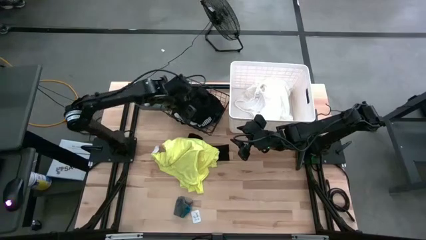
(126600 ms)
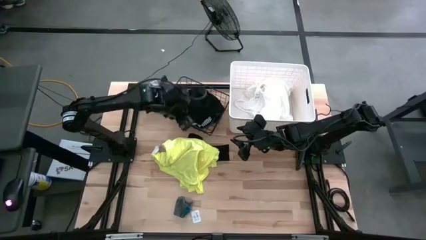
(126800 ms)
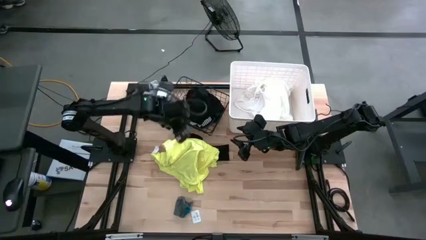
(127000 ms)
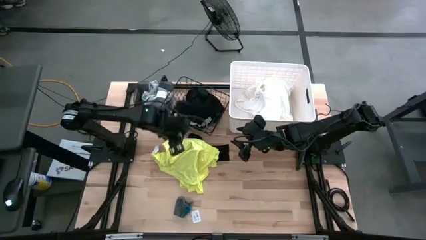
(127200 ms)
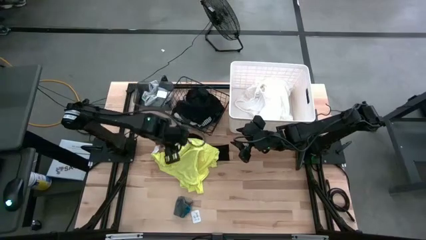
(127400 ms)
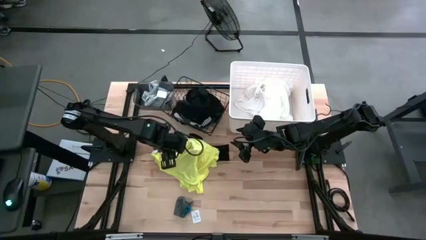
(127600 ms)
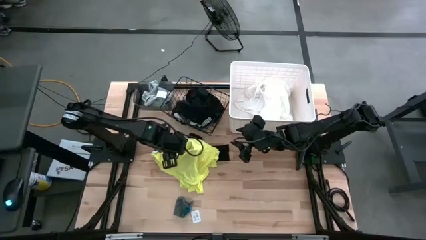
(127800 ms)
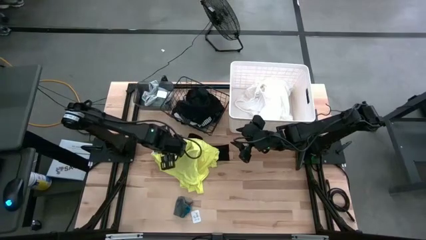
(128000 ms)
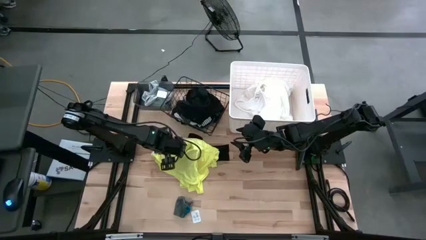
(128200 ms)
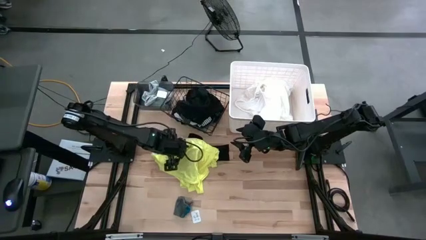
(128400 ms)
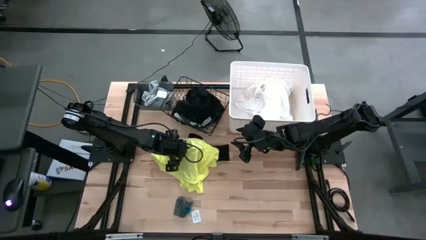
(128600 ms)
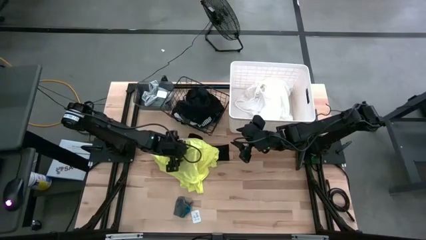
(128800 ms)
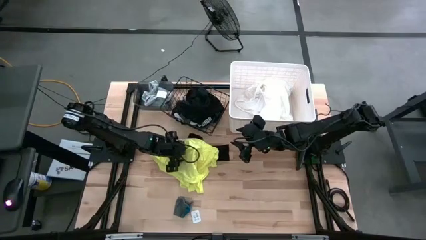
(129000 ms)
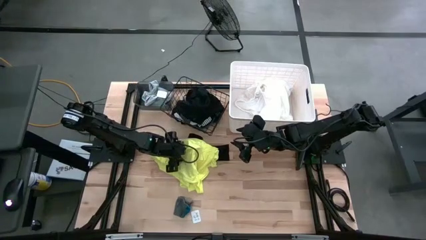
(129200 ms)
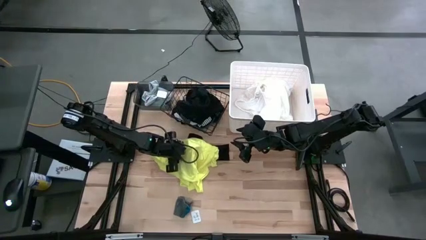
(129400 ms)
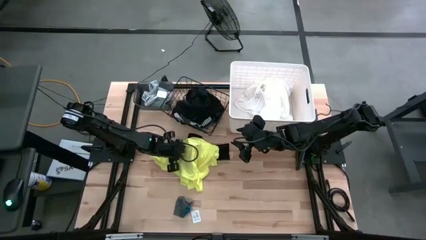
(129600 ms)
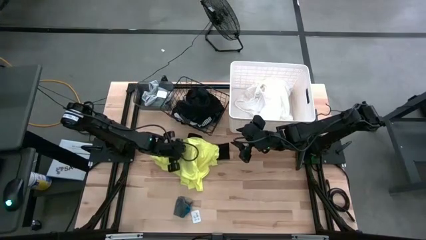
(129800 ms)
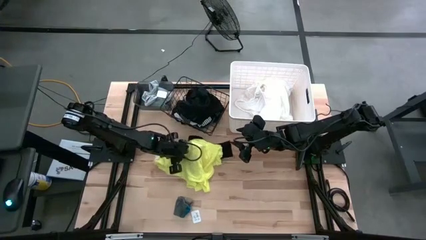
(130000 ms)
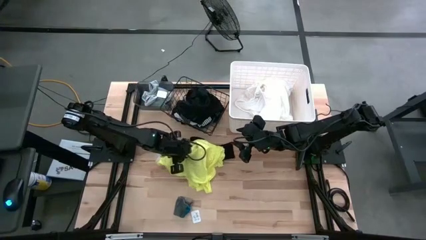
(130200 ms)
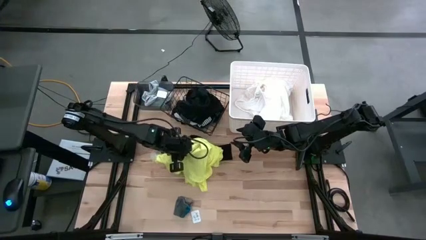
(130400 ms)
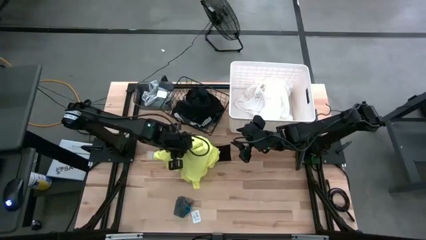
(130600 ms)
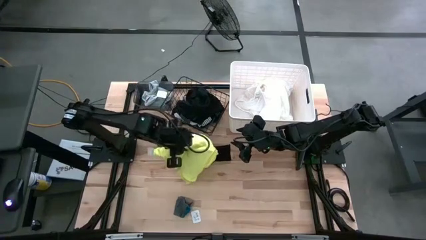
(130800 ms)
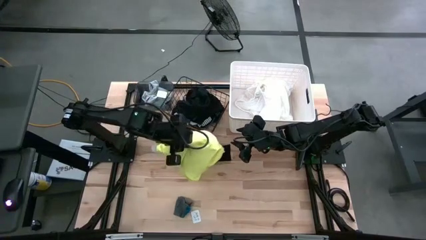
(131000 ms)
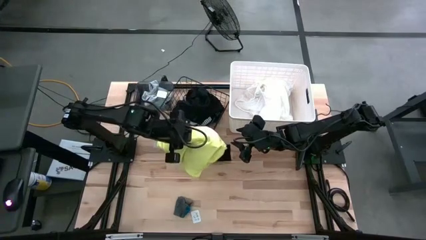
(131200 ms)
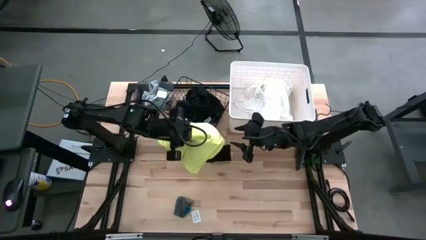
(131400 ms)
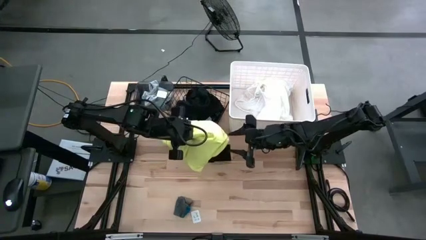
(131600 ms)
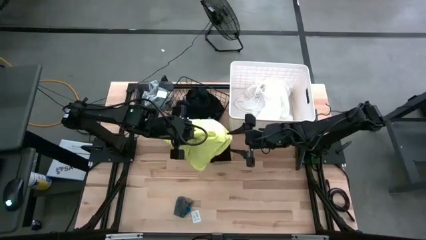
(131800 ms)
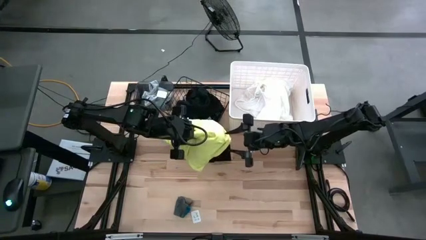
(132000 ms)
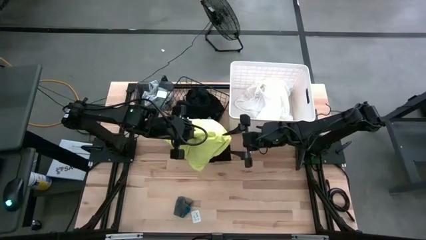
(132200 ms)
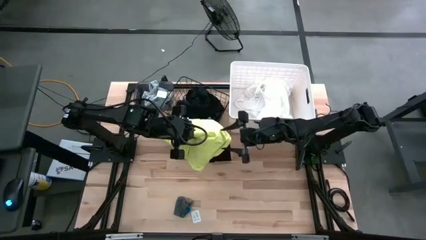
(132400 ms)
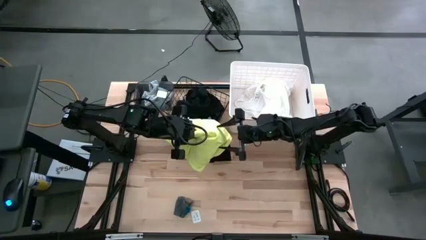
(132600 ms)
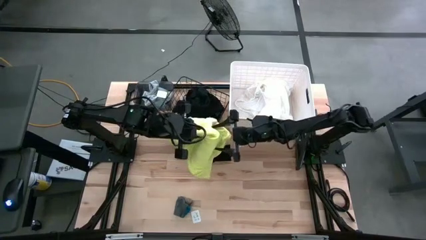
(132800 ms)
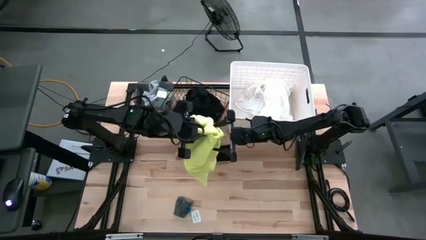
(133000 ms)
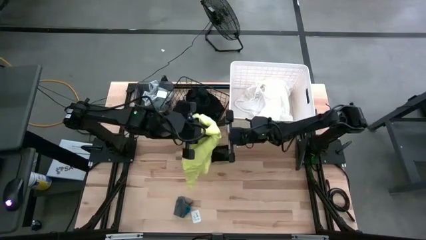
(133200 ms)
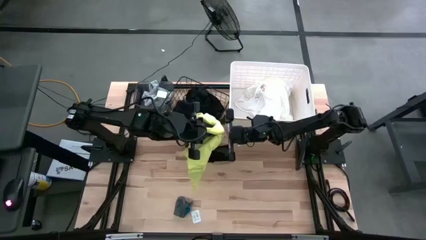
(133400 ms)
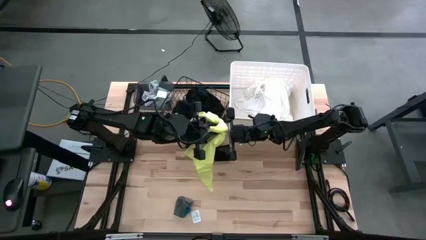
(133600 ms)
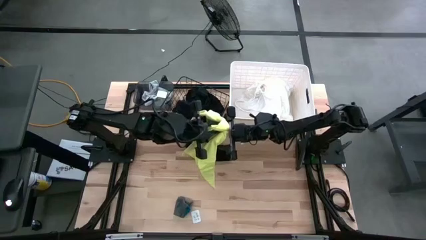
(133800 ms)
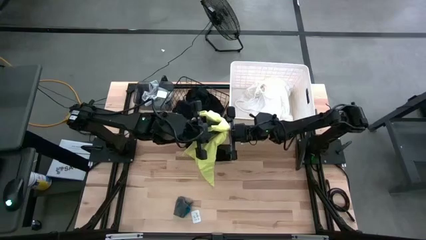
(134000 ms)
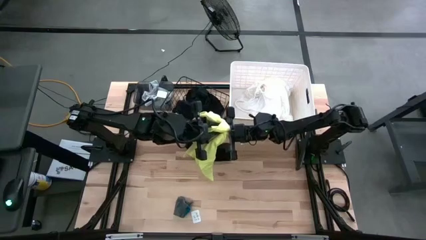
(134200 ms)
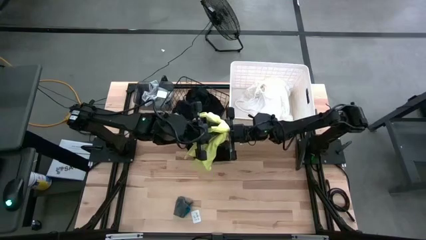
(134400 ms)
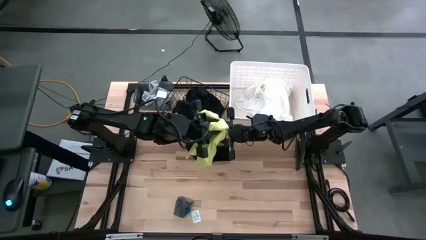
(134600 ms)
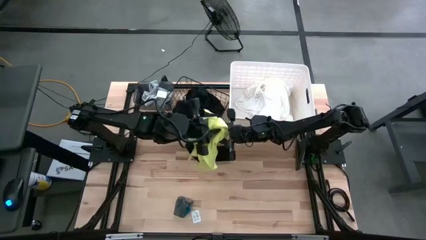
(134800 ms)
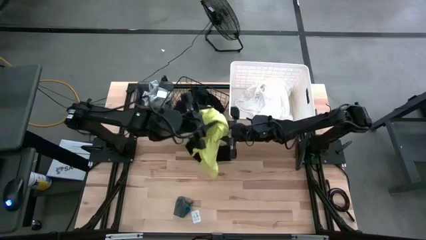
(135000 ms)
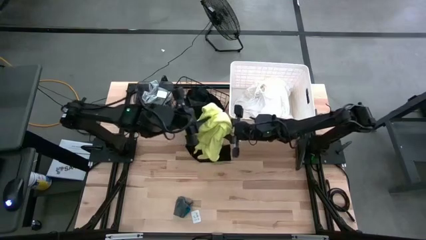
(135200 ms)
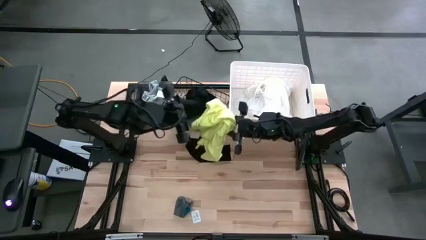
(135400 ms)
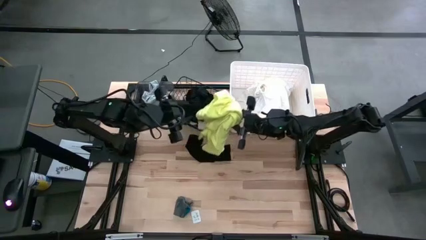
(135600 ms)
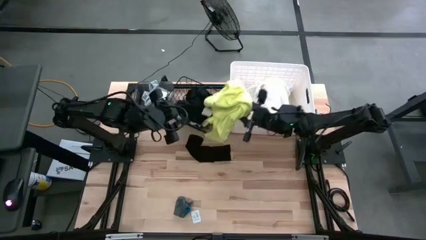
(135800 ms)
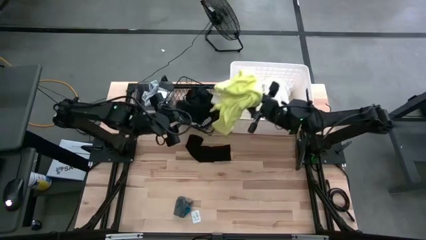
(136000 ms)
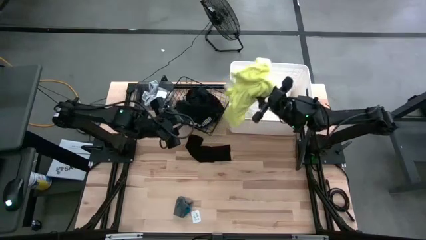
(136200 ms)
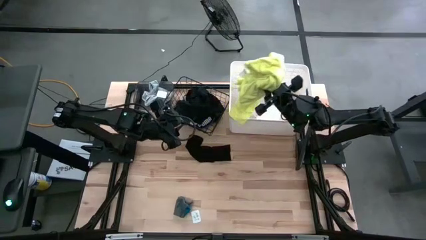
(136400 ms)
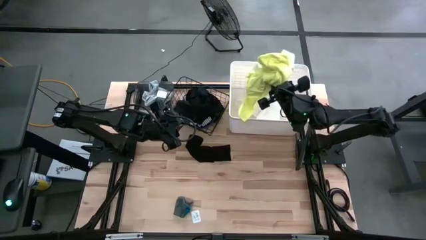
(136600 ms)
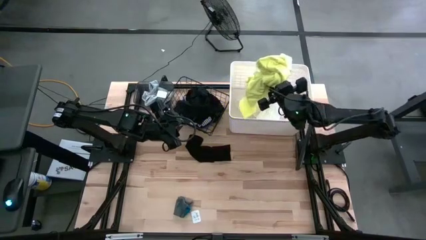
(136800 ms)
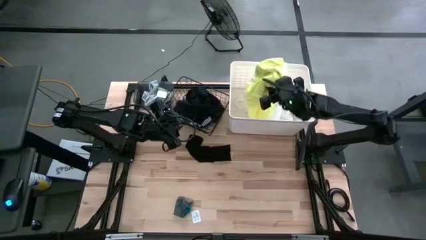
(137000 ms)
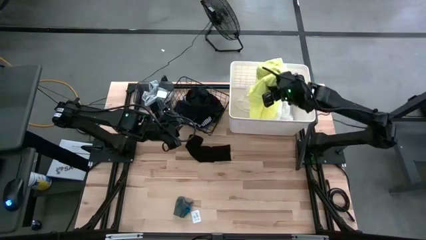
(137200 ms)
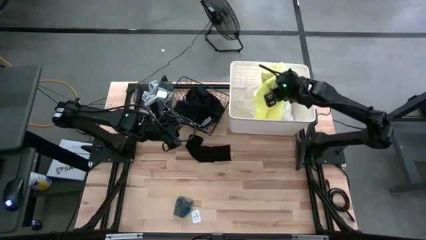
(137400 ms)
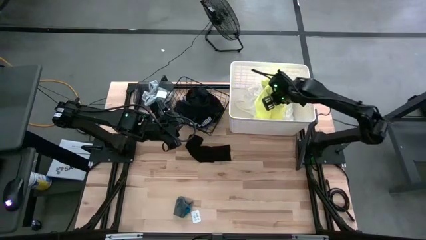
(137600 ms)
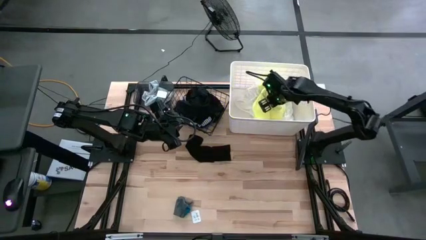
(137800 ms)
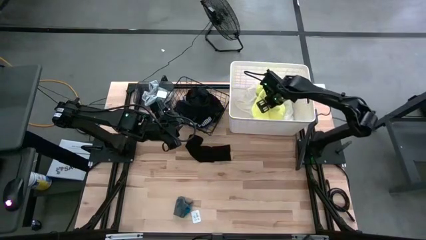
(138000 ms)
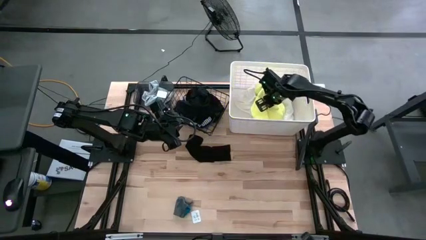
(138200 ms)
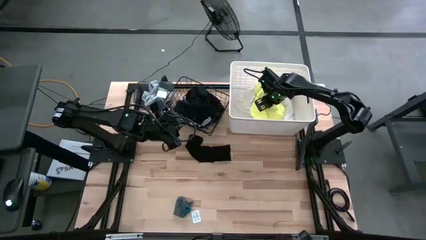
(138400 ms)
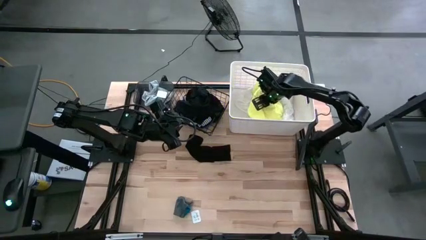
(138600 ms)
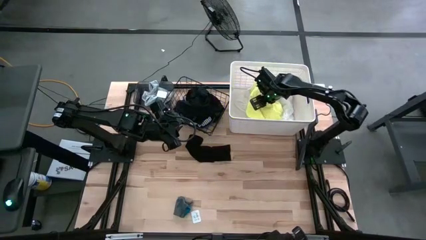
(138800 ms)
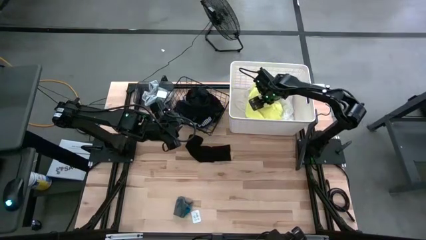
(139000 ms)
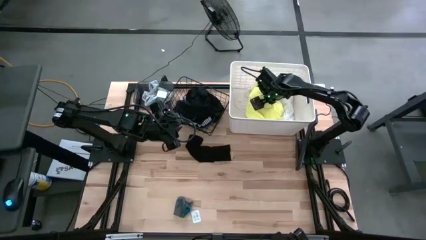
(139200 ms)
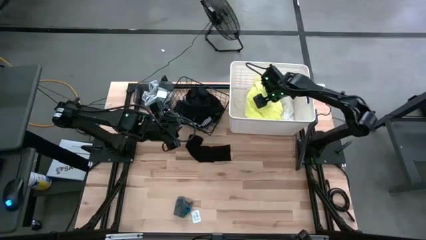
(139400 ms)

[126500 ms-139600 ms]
Task: Pick & Place Cloths
Put the yellow dress into the white laundry bin

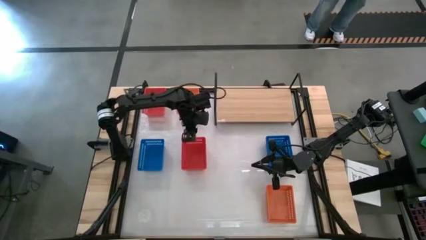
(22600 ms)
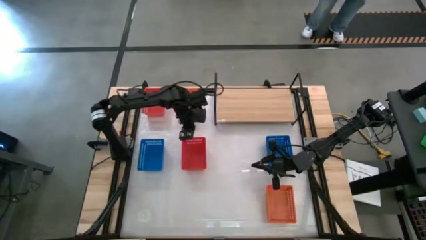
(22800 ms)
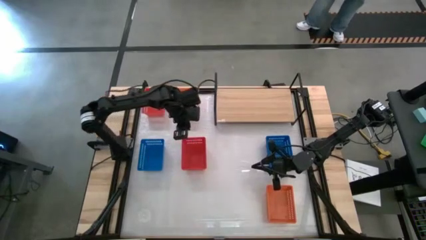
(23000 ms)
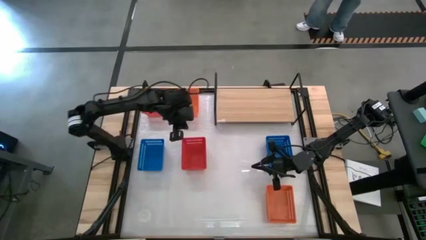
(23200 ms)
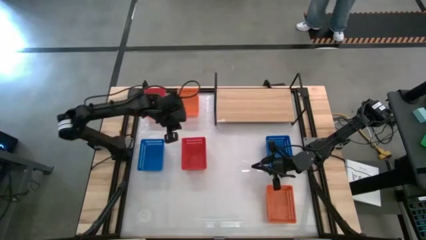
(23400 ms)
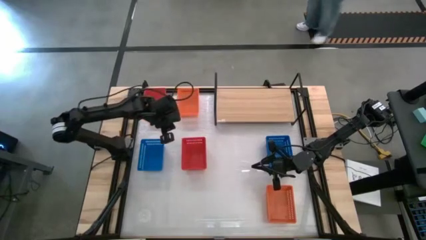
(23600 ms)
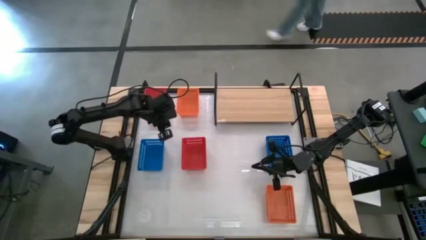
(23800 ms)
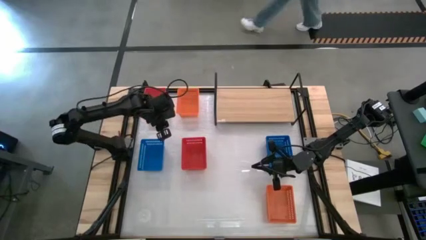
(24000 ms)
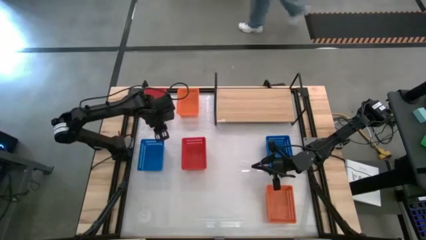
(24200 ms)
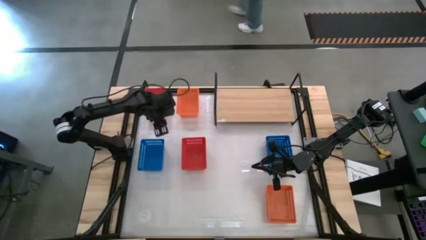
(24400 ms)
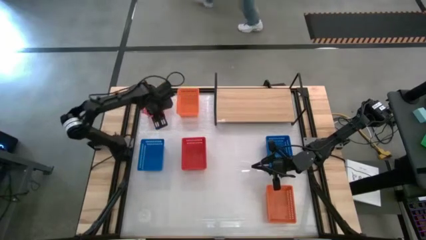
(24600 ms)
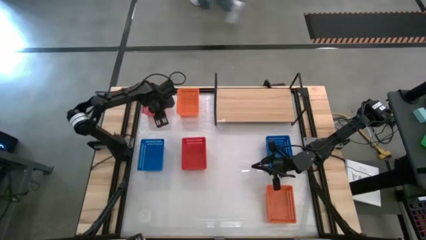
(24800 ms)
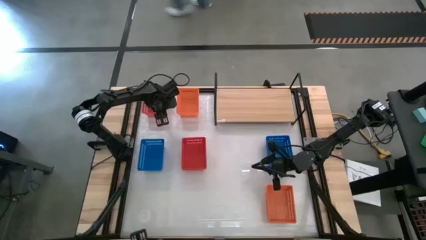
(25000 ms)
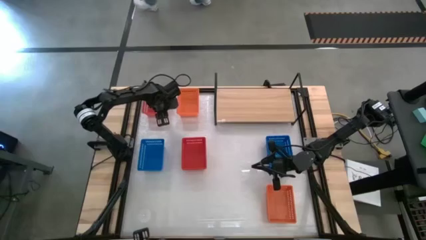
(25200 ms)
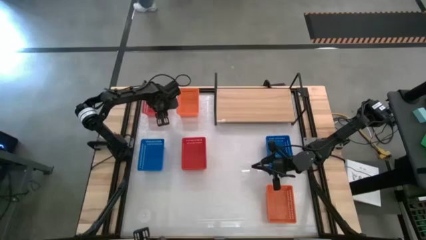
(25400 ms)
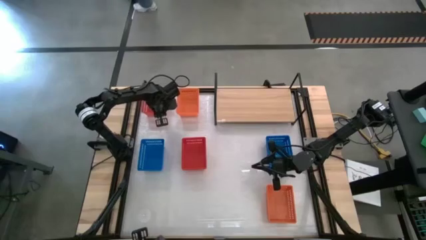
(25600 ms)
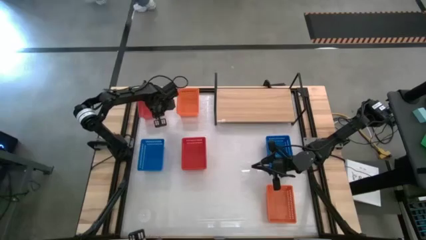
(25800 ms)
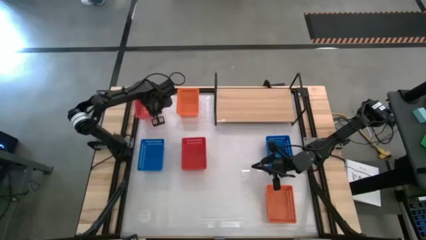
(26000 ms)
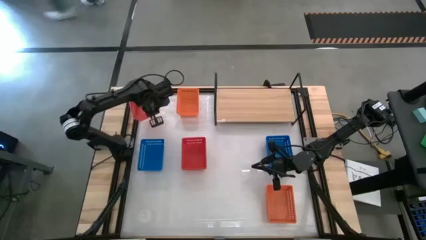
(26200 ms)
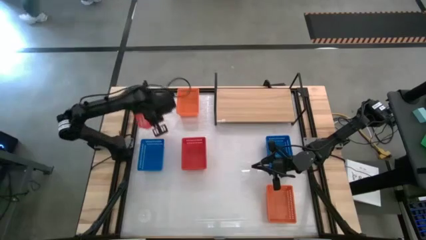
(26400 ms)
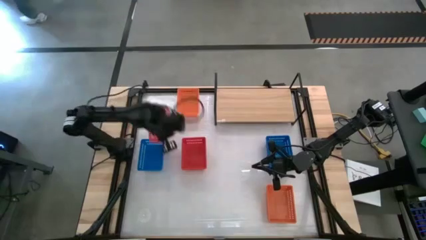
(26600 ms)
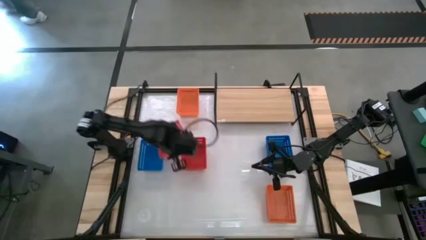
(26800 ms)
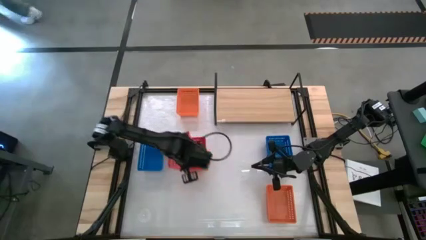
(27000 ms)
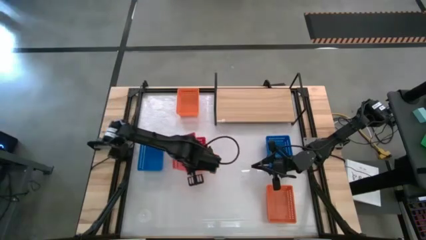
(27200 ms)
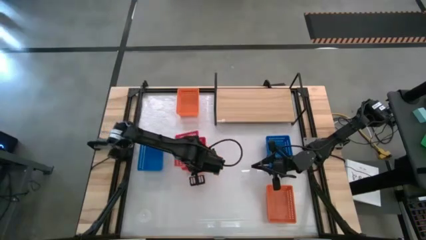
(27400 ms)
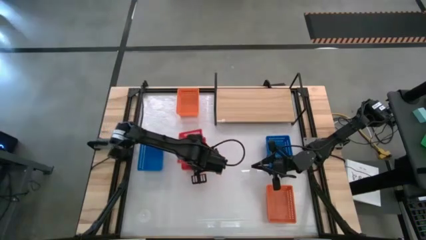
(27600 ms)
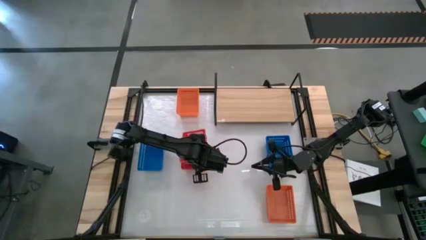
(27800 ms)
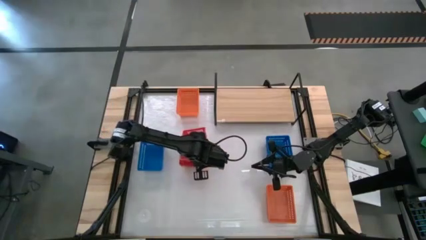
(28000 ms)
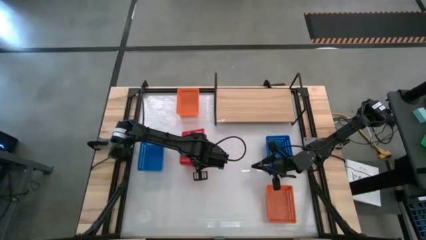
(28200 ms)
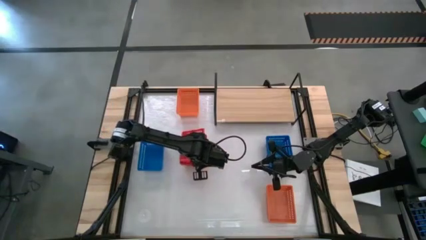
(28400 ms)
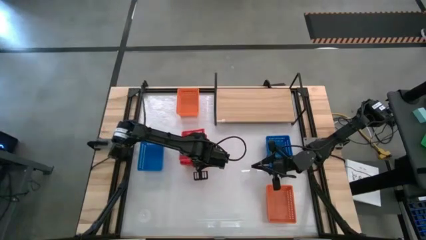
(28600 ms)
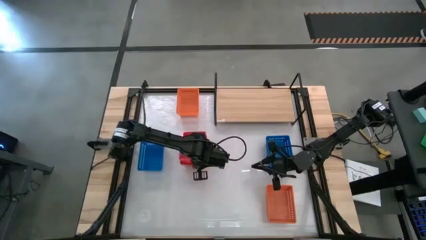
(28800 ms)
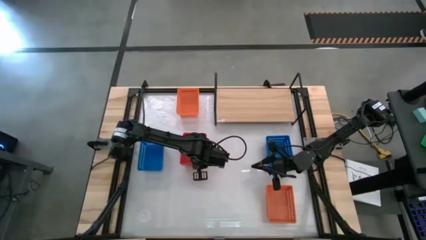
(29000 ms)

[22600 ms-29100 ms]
Task: Stack baskets on shelf by color
Stack the top red basket on top of the bottom stacked red baskets
